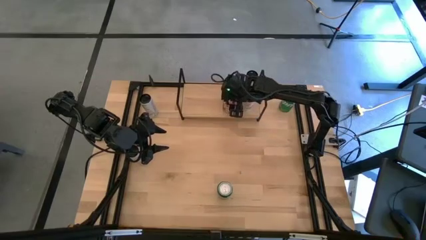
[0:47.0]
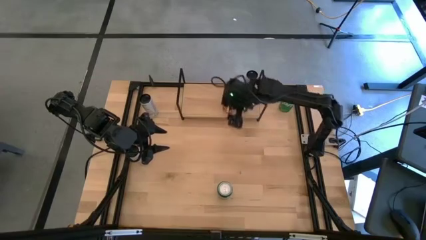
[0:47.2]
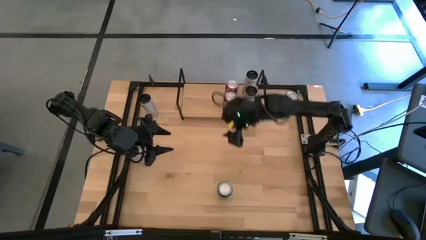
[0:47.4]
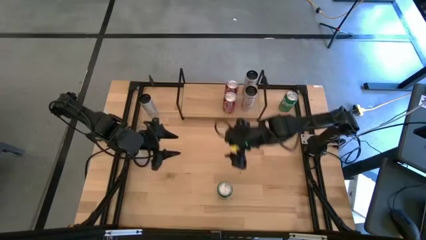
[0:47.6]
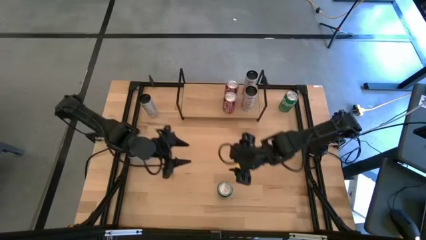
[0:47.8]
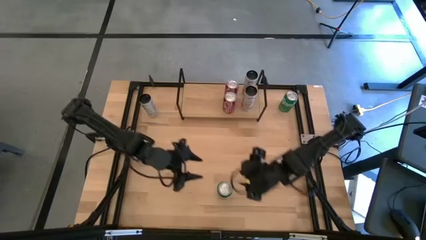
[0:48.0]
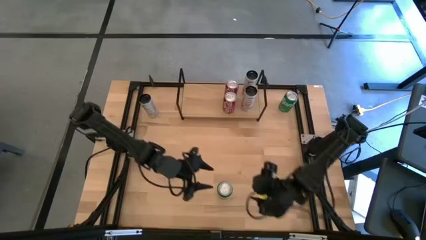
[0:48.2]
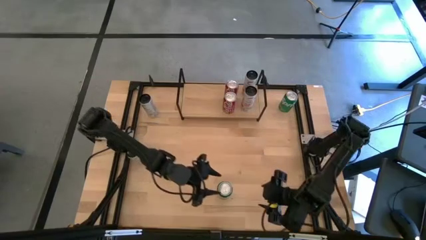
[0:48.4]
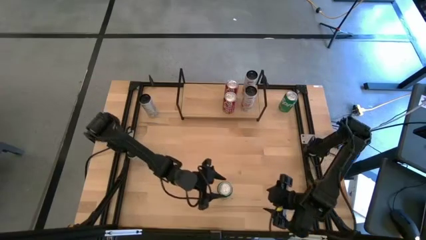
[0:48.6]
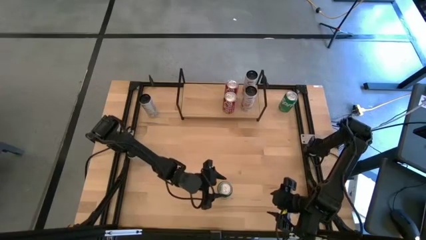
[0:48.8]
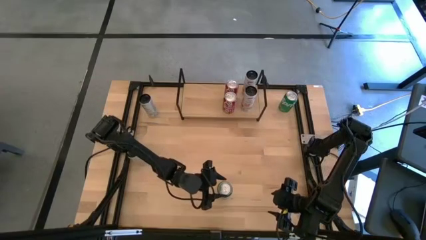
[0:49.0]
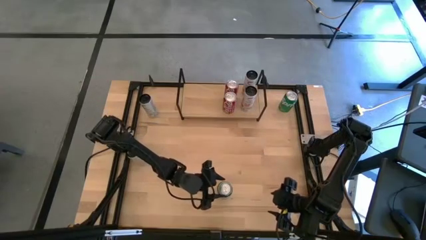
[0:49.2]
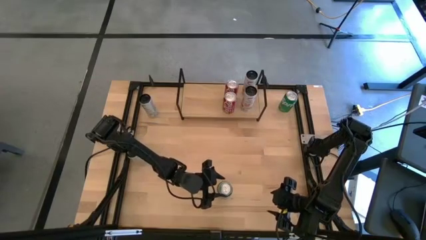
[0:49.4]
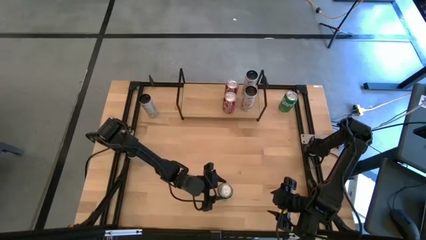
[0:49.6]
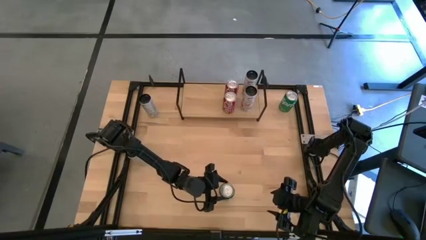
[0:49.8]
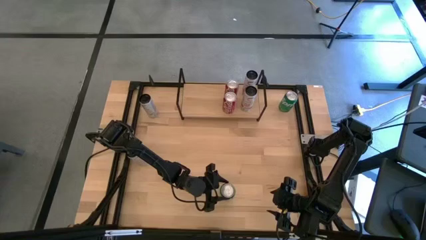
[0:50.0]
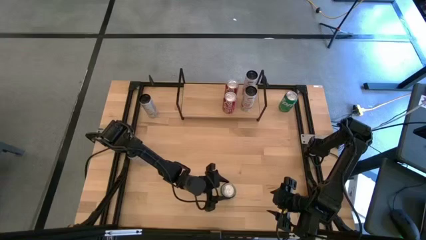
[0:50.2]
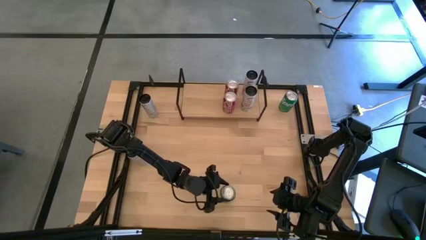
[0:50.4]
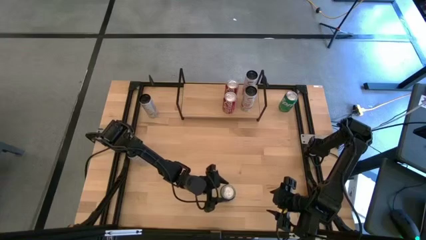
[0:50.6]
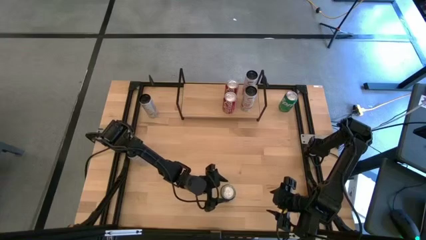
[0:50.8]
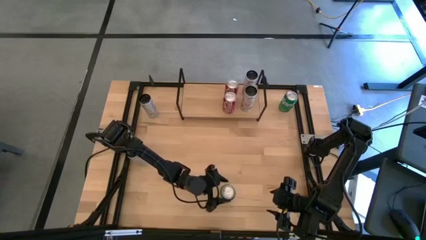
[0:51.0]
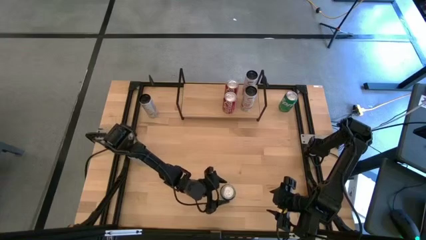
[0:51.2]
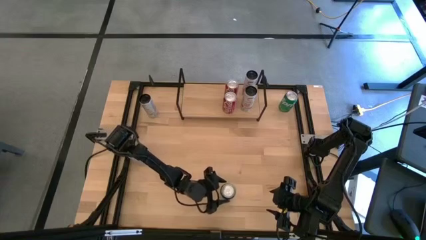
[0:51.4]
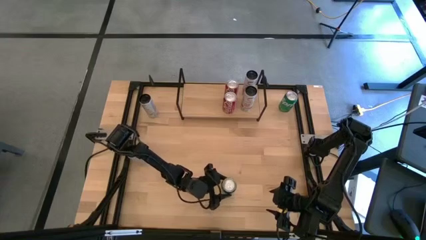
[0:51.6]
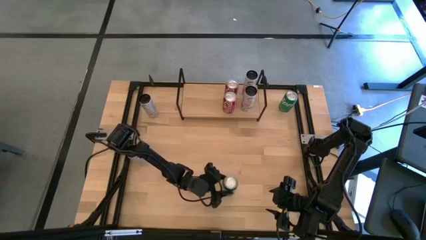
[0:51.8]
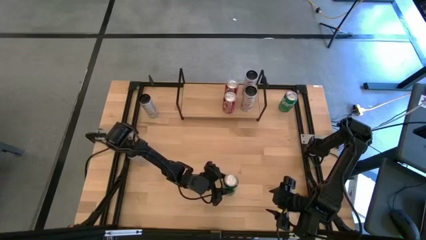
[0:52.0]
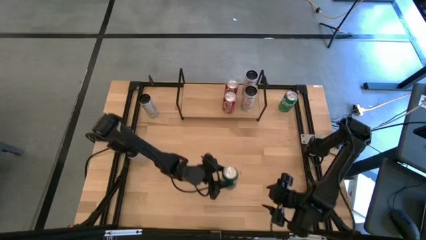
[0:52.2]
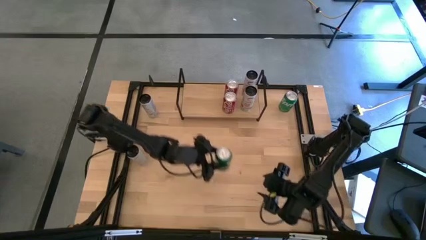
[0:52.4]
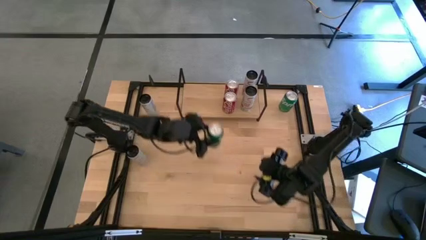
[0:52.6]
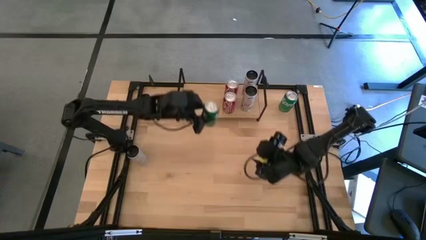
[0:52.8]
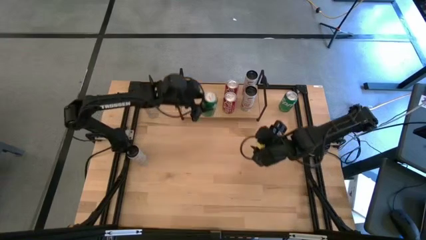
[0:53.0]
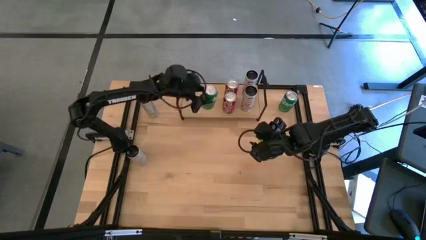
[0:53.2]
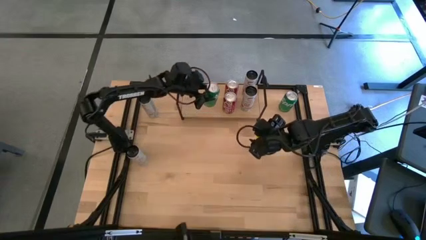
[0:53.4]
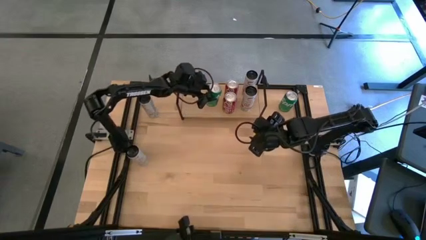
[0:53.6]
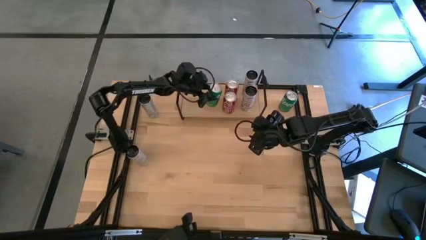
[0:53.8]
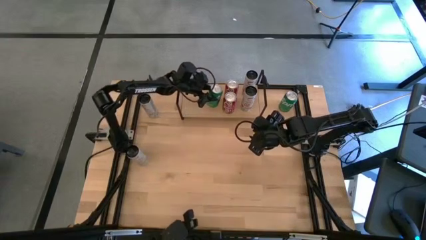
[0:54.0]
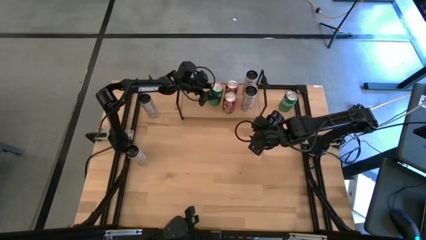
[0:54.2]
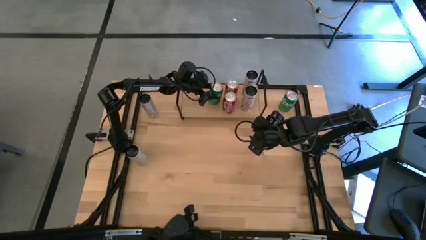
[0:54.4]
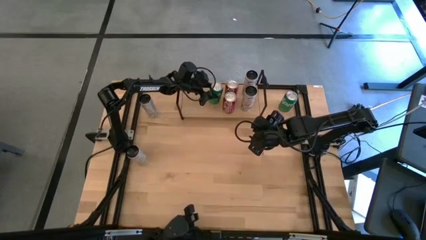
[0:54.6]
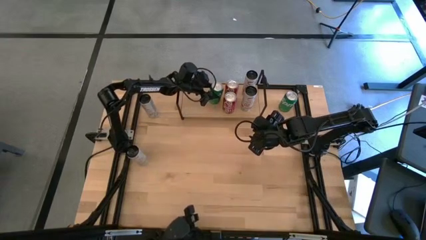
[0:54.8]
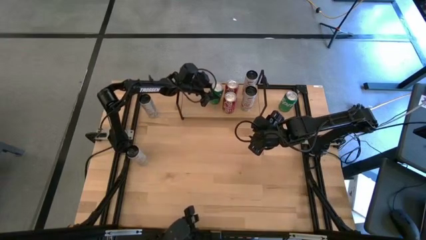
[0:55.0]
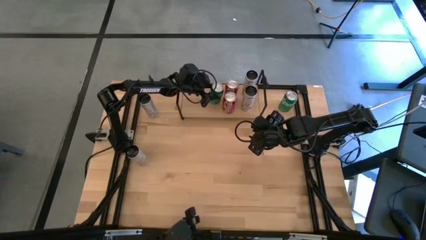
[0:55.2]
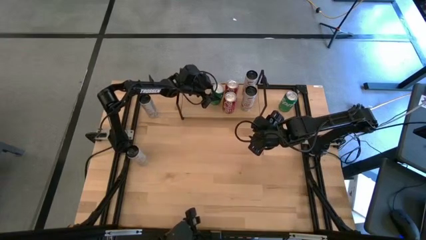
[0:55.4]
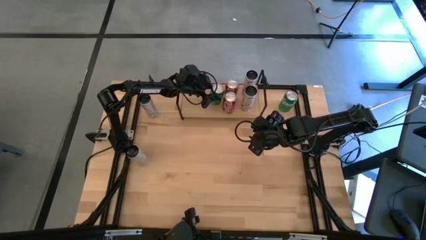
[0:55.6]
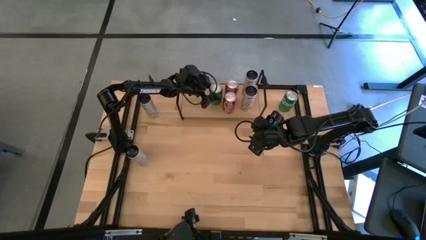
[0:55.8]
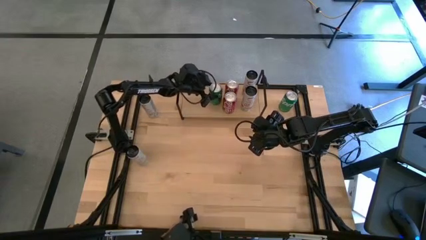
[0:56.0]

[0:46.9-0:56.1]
Task: Place canned beverage on shelf
Put the green soda can on the shelf

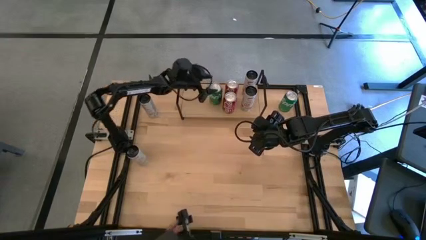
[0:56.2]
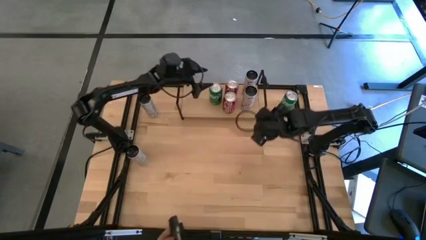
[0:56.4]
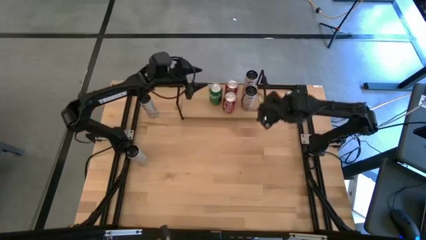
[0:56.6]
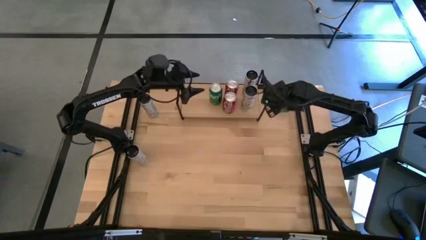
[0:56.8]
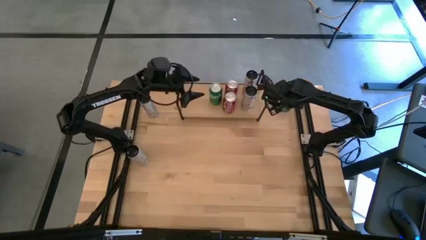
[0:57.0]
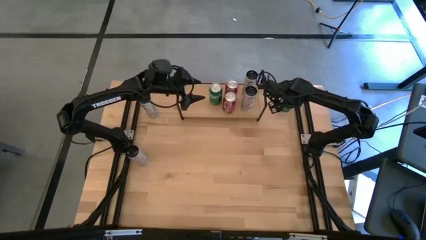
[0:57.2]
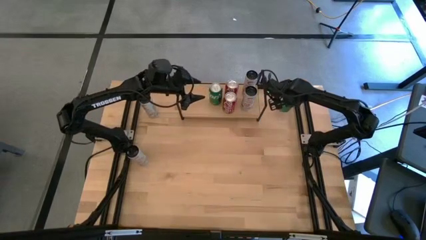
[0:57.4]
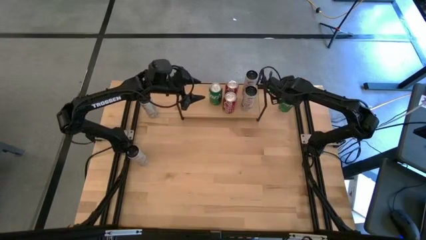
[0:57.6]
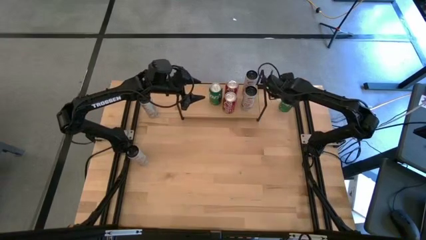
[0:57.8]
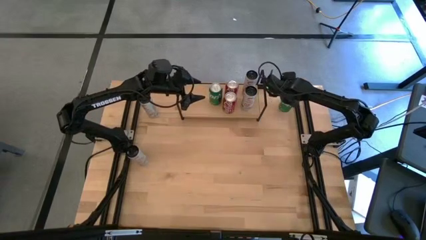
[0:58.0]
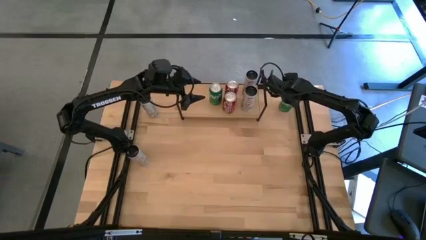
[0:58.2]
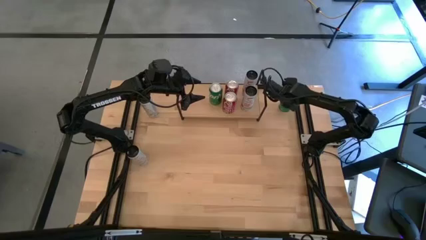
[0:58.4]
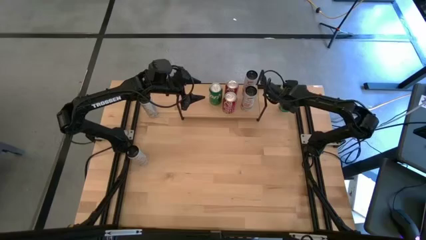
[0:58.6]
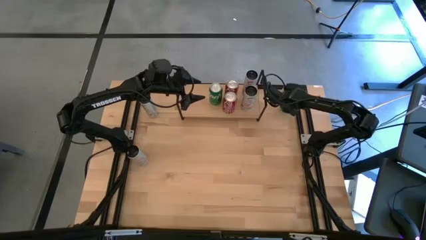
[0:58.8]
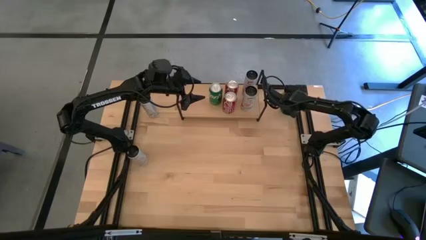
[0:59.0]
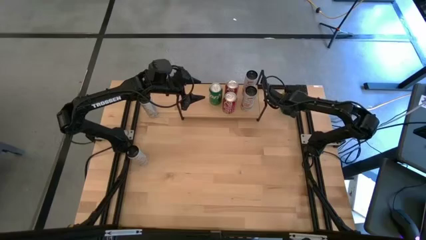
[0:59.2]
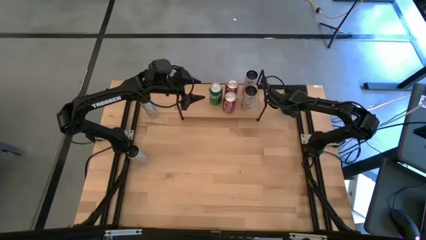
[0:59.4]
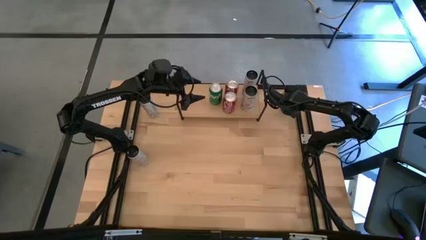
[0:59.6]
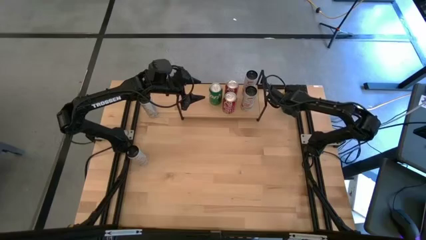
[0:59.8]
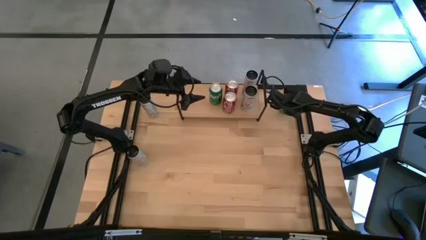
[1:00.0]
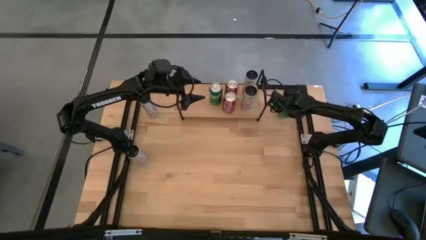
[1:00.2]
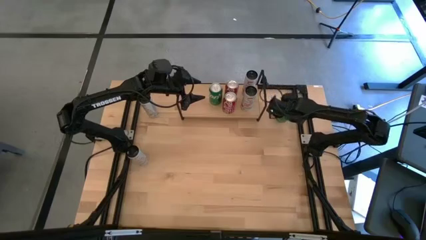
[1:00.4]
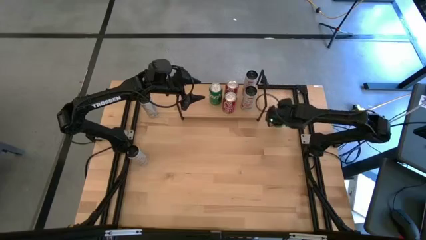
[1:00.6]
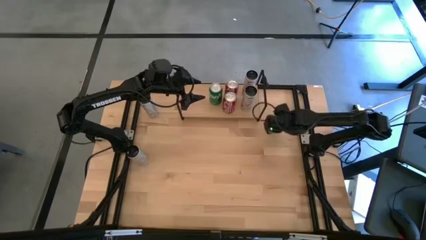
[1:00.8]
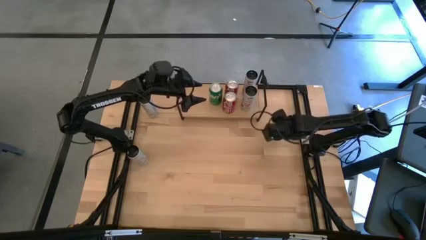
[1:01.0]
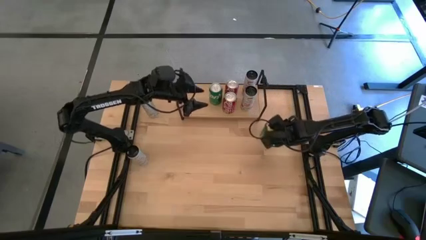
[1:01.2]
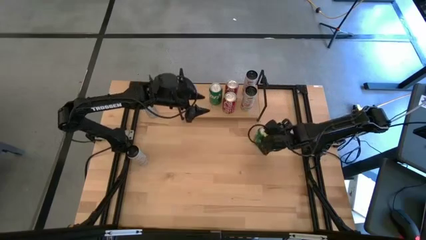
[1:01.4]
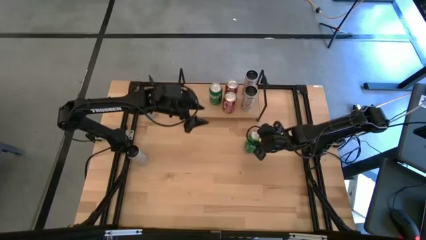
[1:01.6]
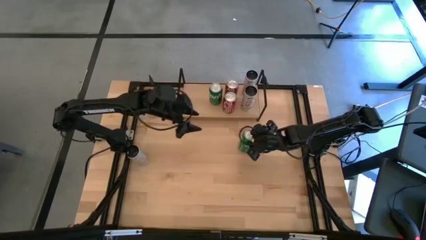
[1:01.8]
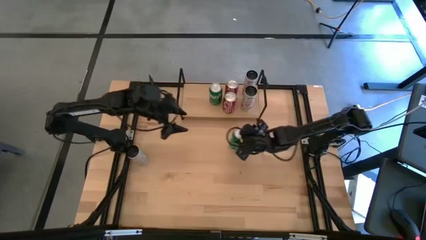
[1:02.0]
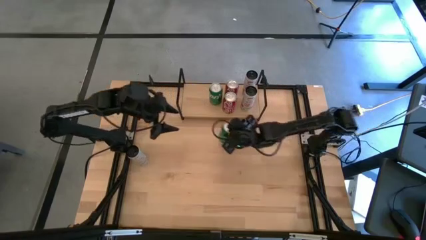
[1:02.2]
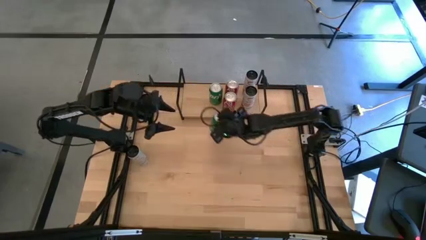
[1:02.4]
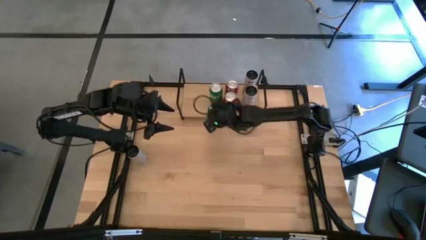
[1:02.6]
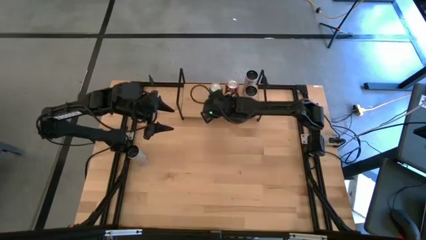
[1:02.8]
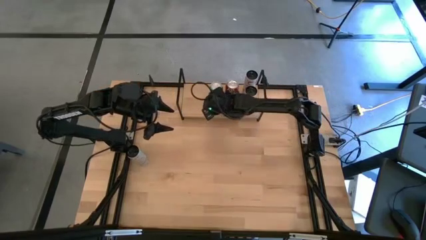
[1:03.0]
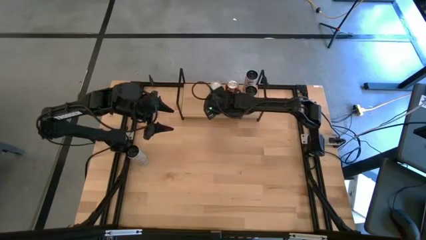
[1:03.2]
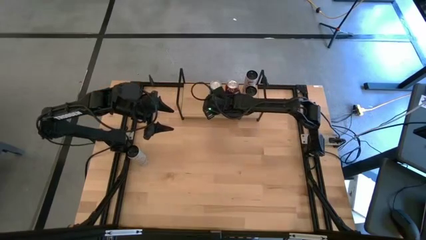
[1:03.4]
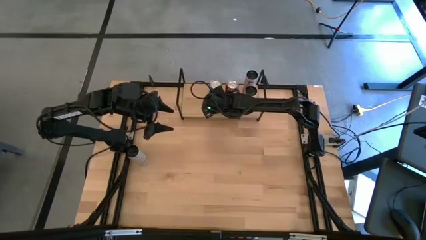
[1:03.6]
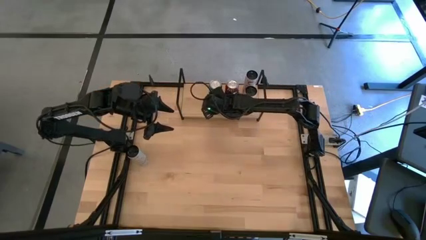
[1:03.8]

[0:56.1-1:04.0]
Put the green soda can on the shelf aligned with the other green soda can
